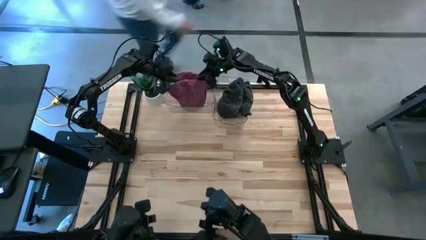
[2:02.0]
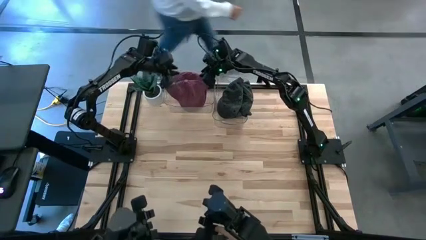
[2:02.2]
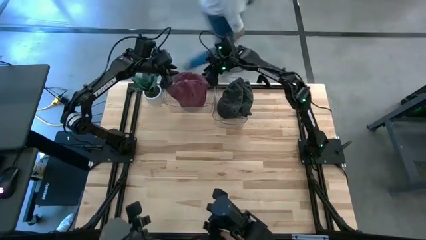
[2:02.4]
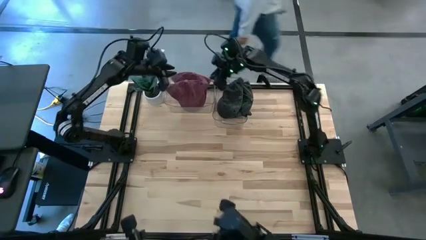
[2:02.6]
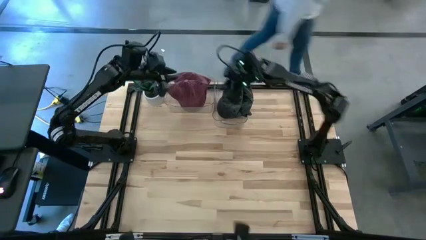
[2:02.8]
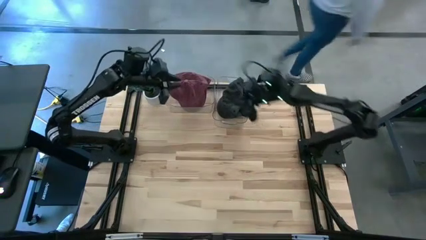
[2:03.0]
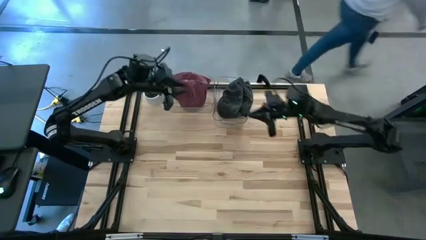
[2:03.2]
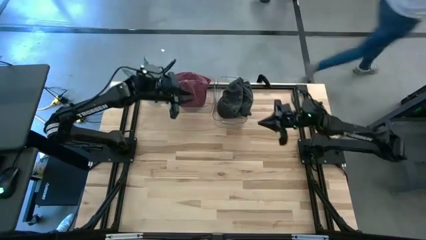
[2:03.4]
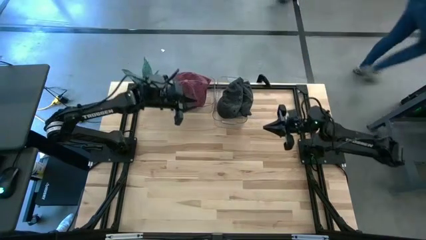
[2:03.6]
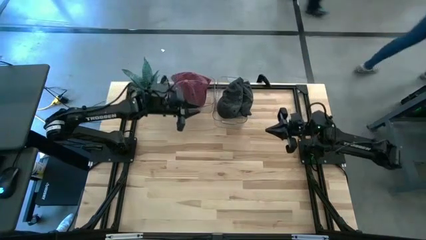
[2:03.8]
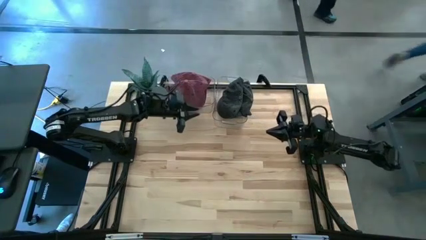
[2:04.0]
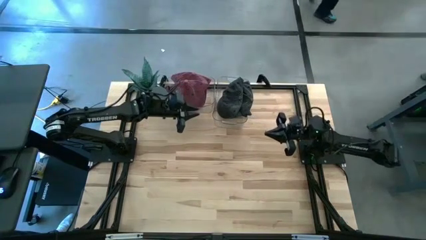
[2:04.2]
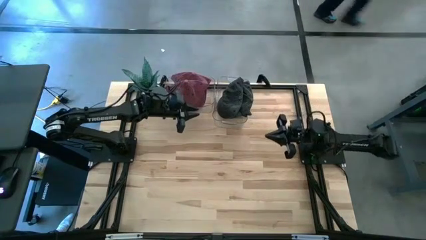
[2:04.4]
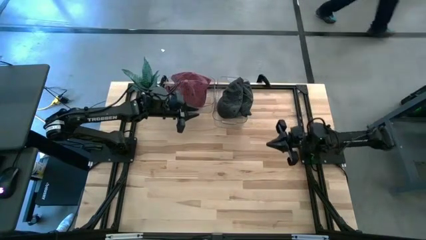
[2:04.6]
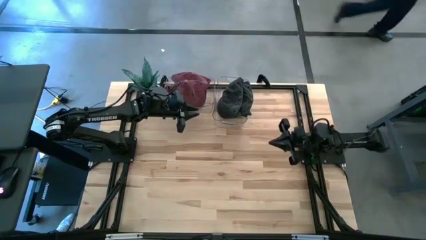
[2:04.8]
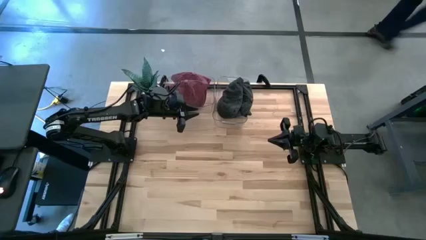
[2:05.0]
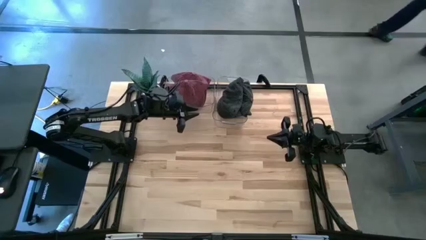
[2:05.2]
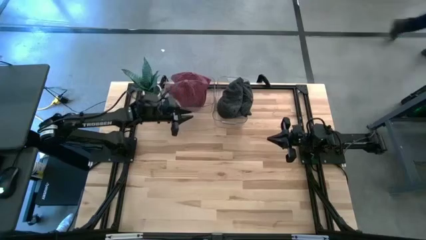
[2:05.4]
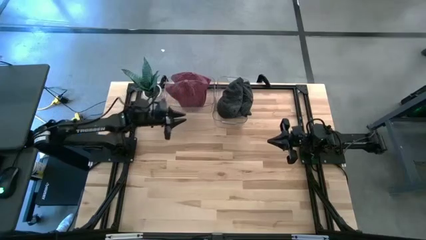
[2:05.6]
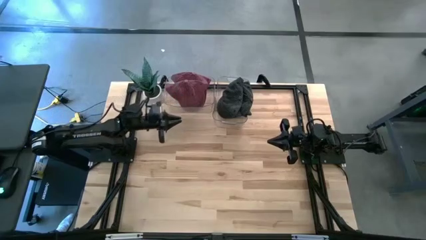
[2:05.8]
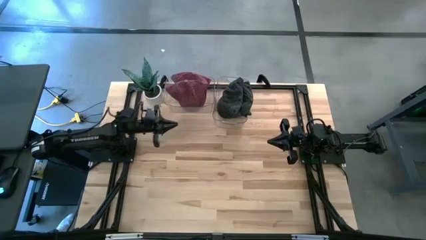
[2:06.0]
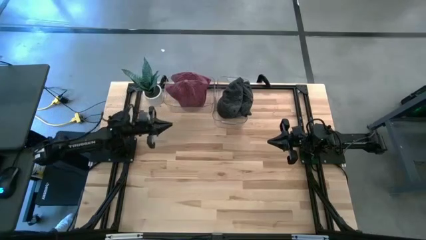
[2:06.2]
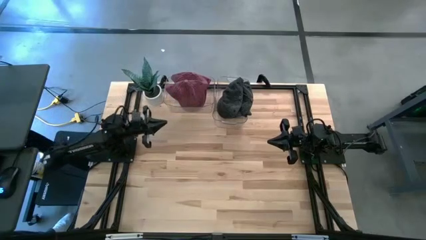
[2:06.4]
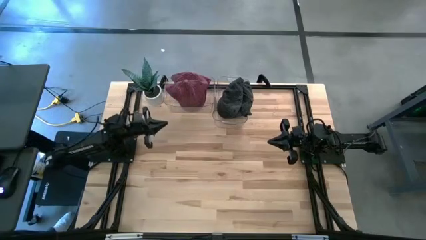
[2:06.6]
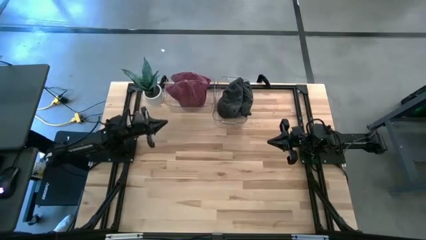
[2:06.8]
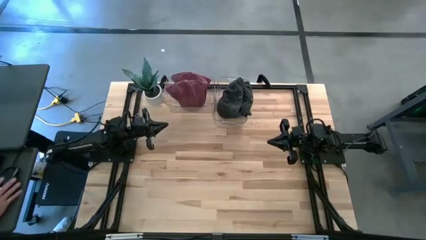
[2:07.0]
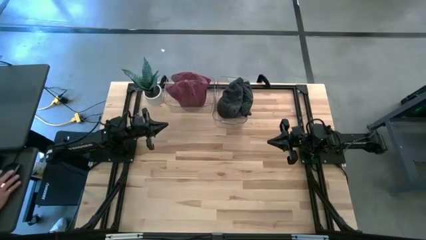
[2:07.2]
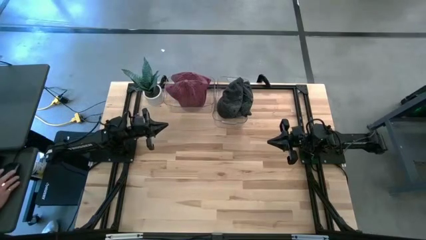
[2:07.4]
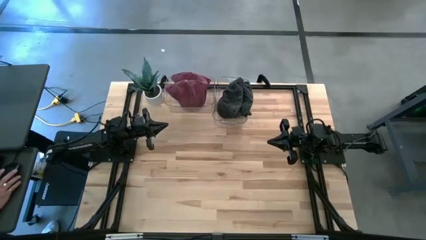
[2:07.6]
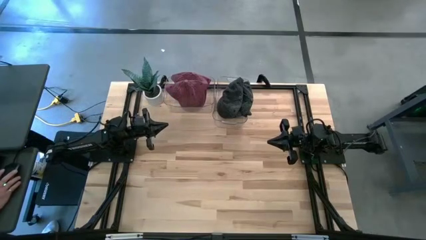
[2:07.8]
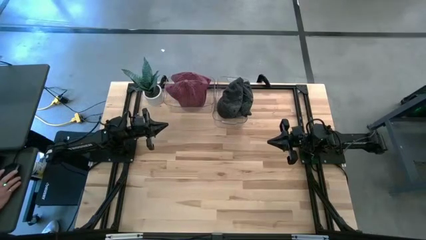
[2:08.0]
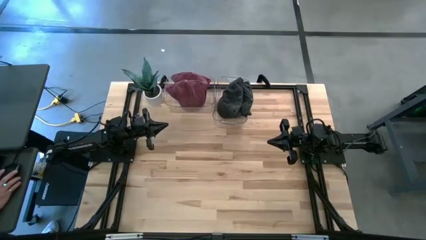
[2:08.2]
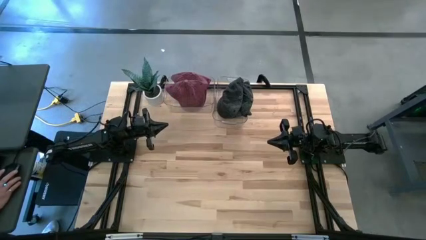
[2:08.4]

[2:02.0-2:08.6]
Task: Pick & Place hat
Return to Home Position

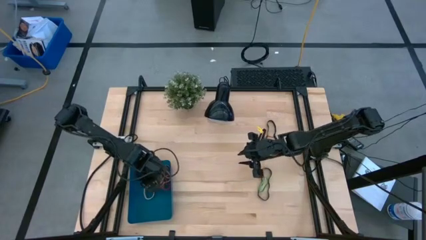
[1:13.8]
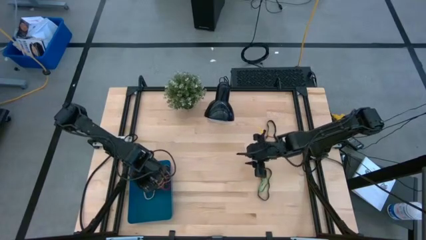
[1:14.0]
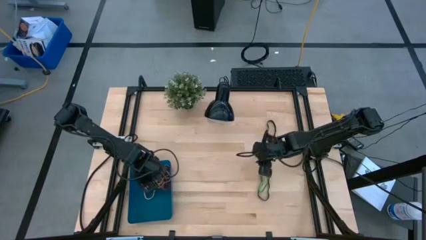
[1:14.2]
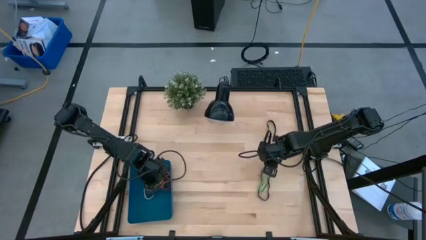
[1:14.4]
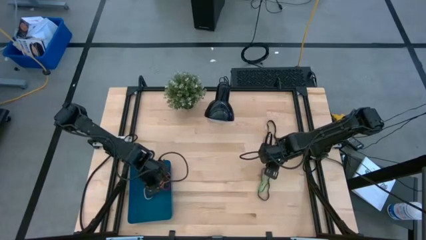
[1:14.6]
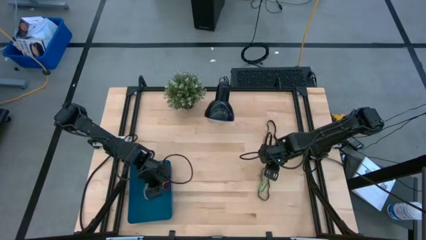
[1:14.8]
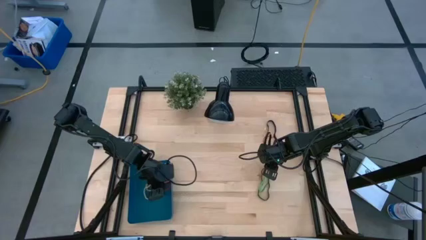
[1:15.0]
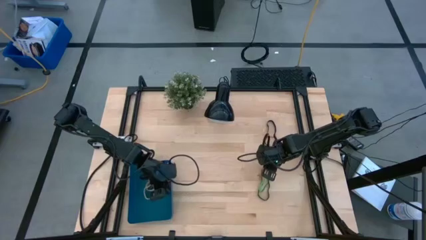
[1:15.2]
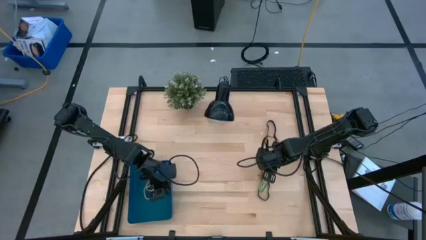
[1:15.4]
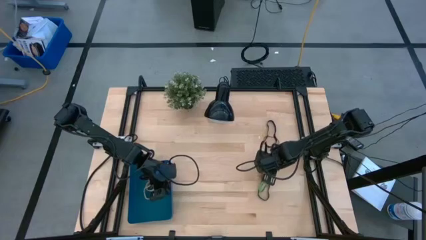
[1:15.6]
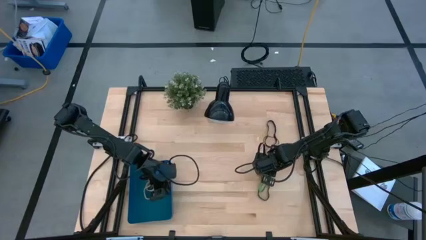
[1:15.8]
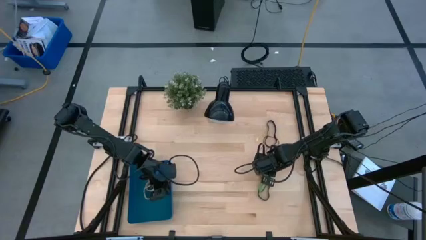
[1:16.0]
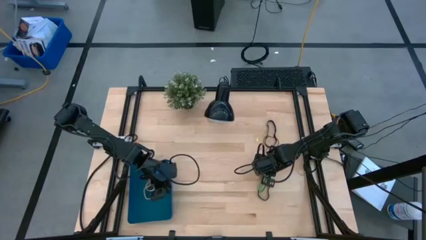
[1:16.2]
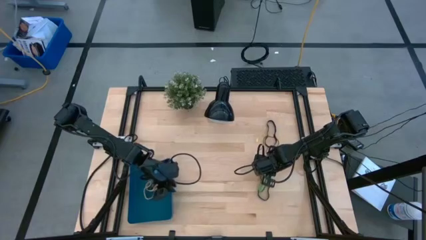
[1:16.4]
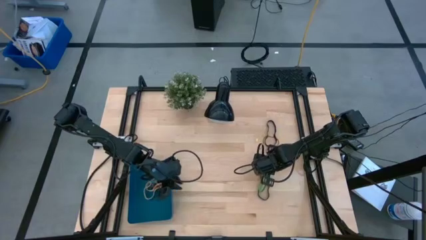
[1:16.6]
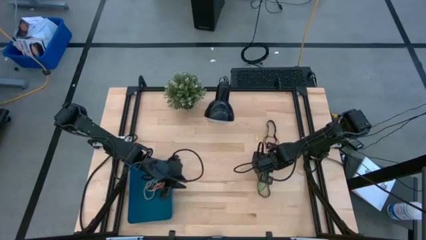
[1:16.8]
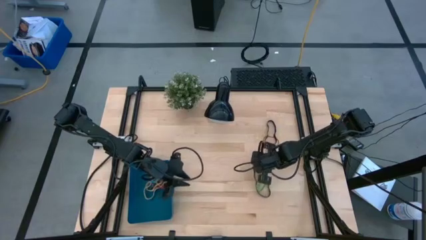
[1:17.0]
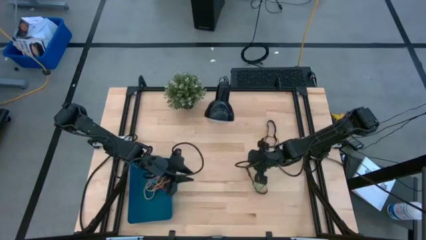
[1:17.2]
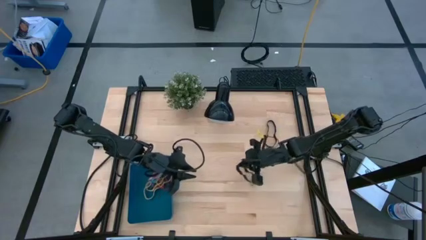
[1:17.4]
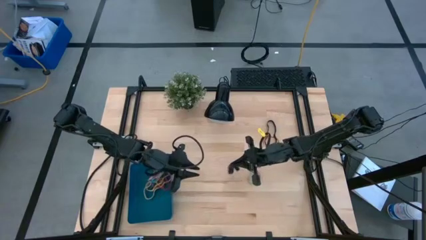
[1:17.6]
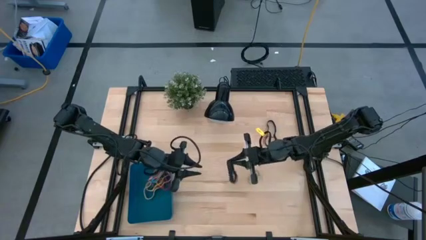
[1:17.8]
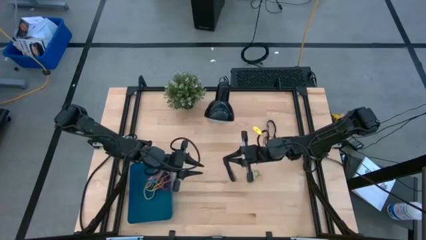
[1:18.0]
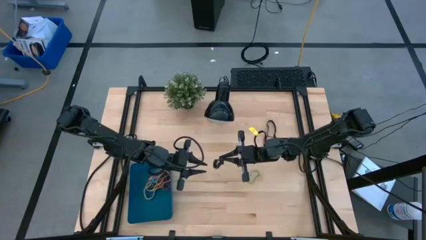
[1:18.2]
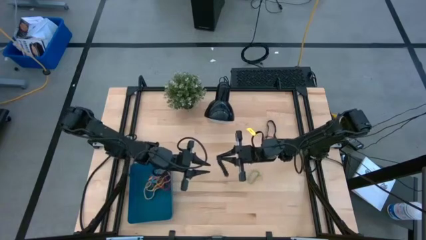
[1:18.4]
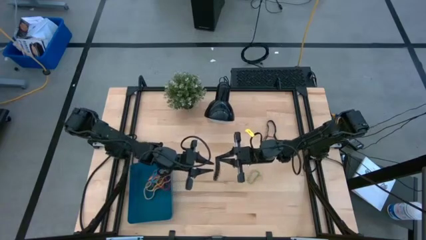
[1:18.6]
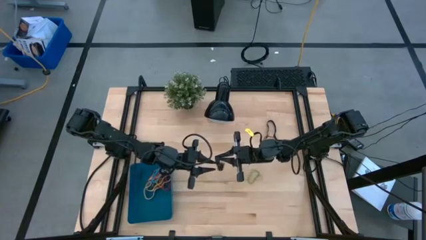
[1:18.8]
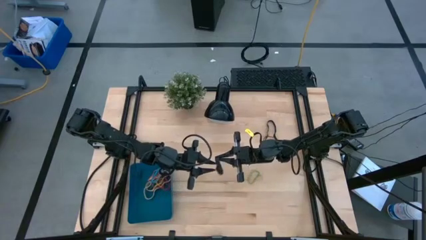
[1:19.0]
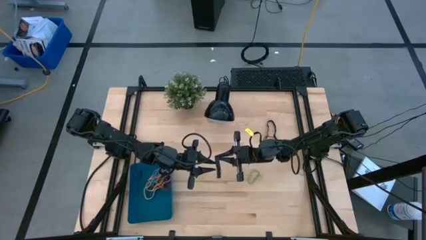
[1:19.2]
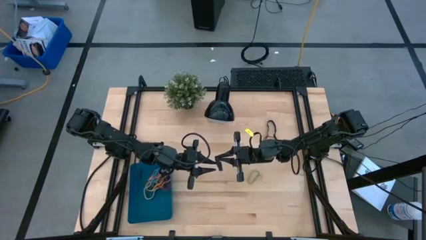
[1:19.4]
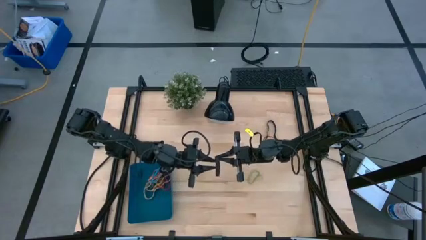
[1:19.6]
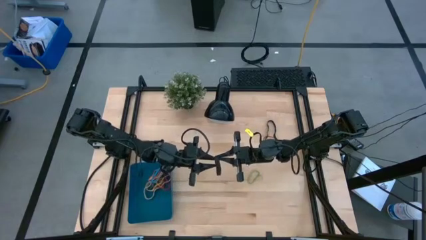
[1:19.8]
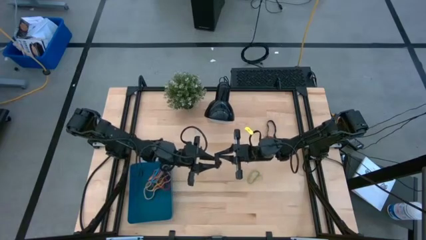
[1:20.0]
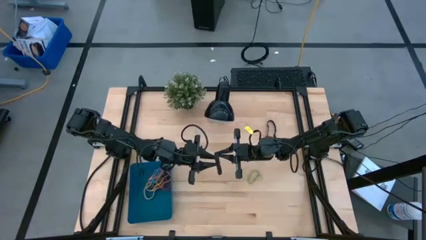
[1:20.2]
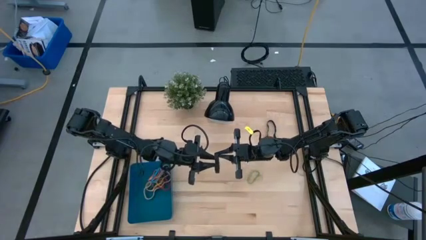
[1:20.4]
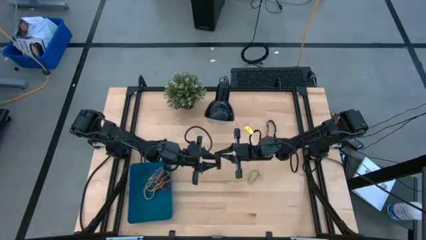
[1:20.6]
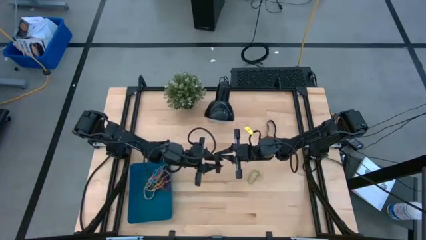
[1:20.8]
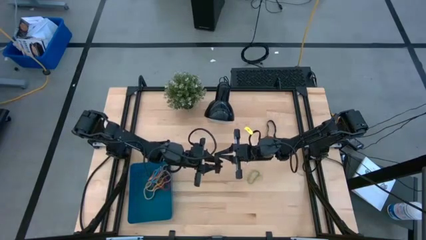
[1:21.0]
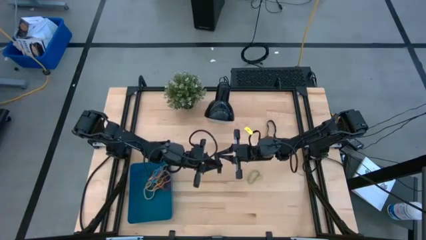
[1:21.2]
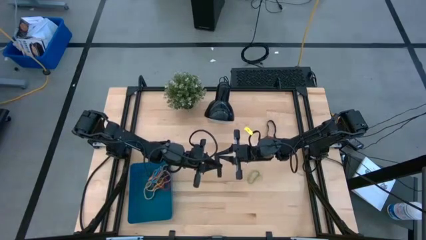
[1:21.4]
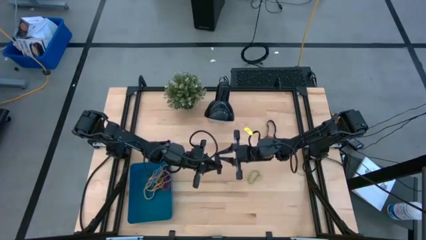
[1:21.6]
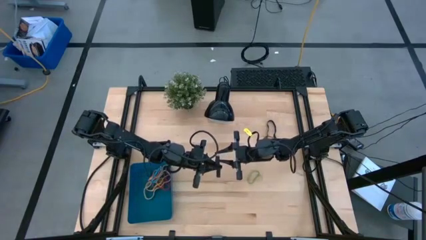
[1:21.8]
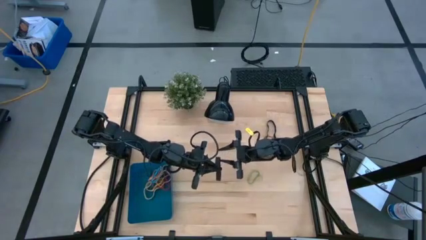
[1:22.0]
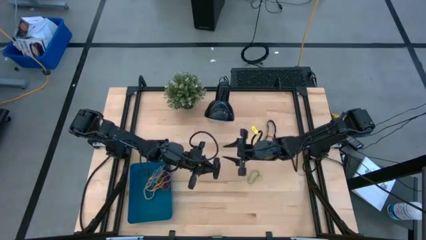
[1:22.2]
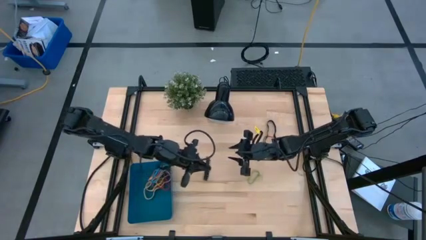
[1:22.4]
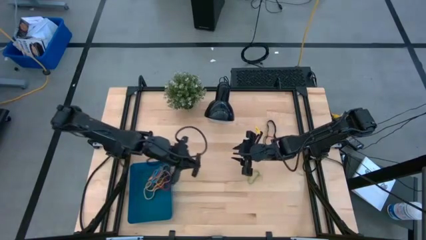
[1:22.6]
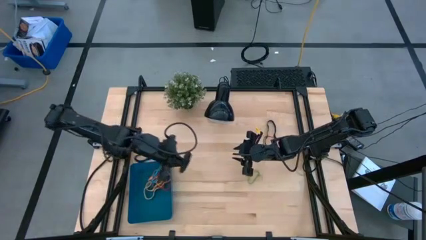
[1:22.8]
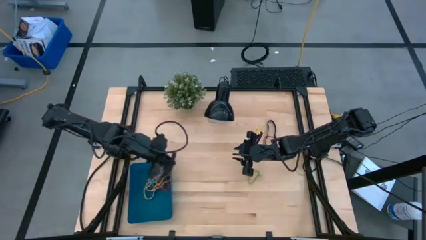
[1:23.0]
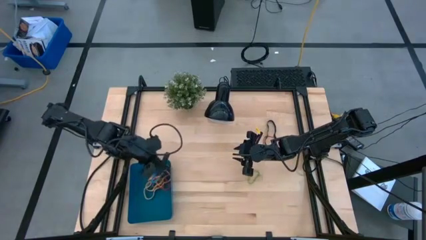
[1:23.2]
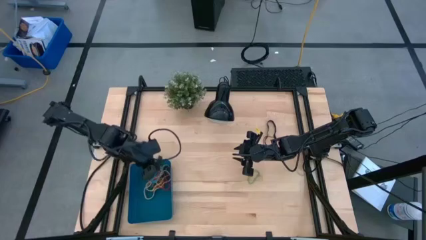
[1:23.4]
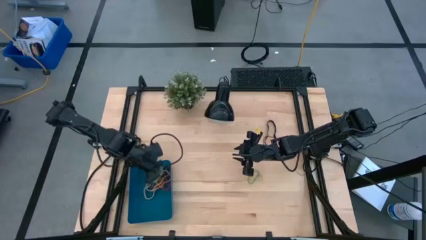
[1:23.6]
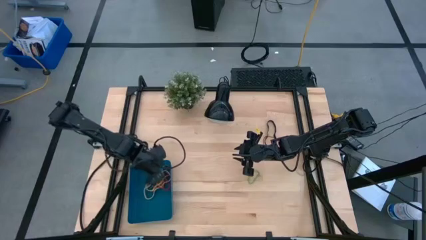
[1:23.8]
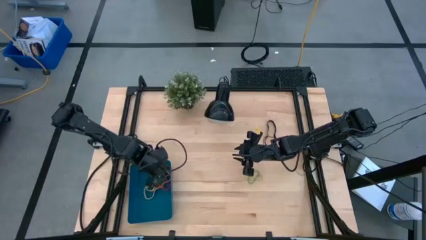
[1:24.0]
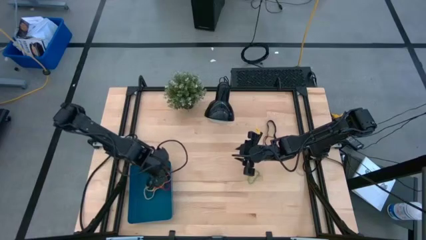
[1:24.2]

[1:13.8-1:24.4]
Task: Pick and place rubber bands into bin
Put the bottom black rubber band into the blue bin
